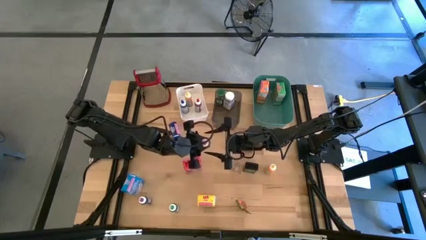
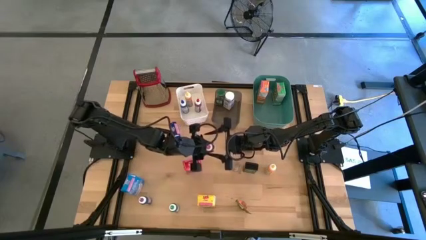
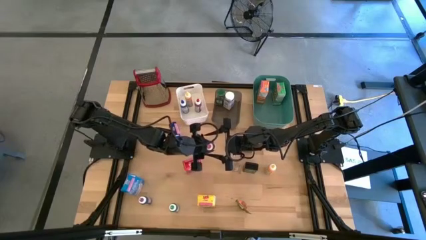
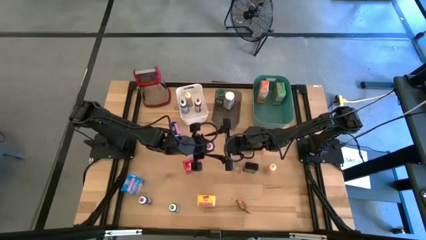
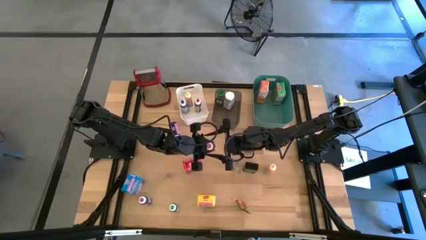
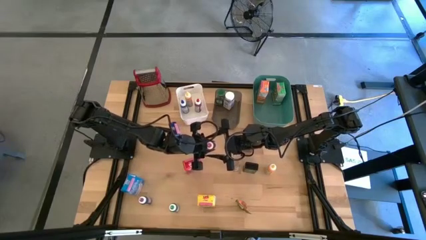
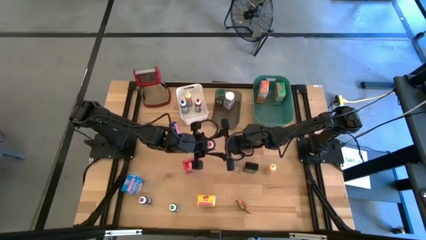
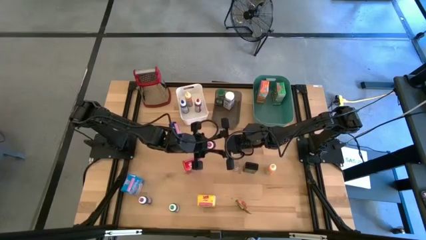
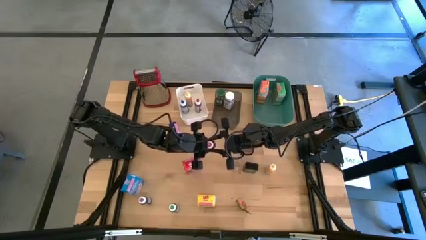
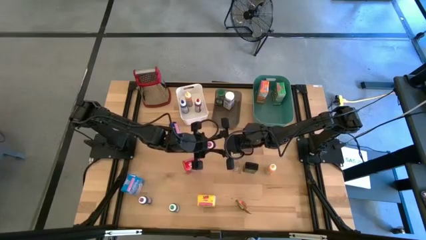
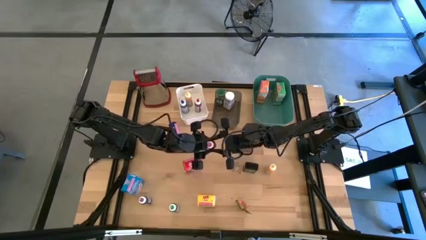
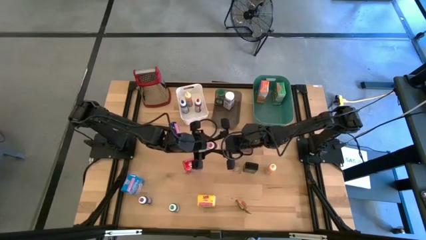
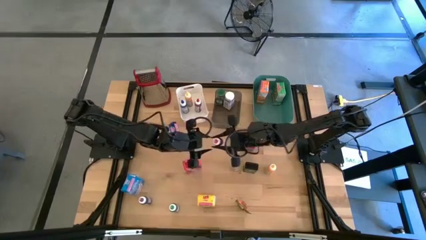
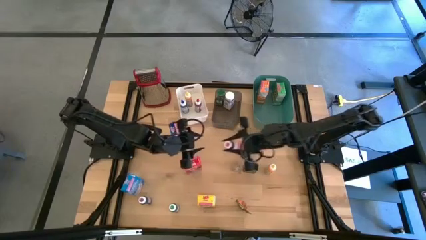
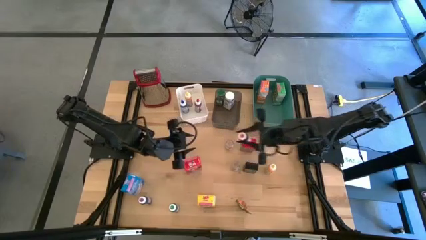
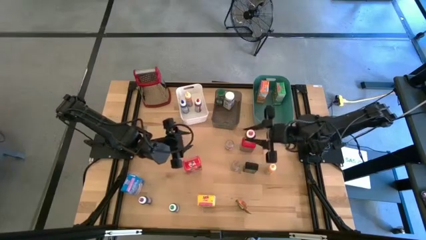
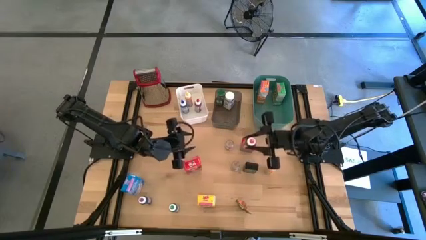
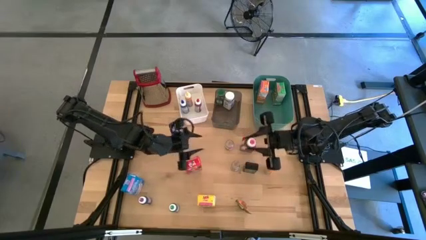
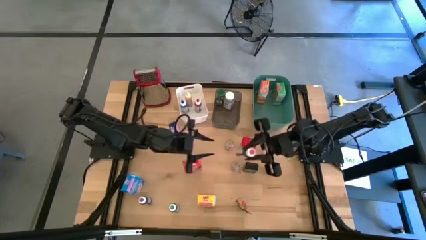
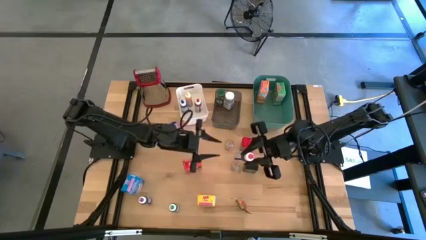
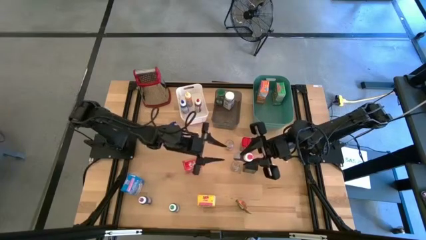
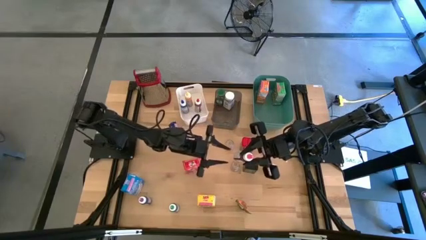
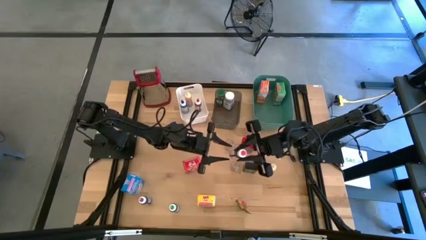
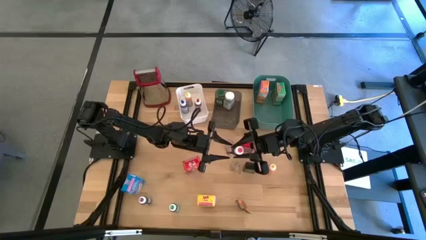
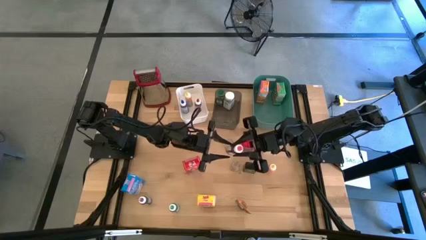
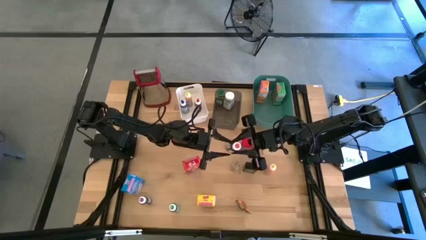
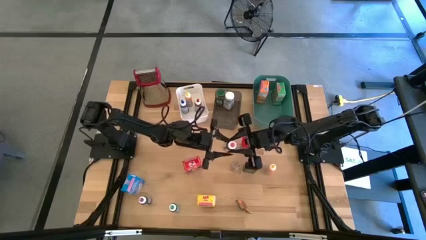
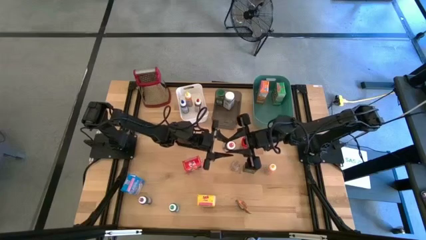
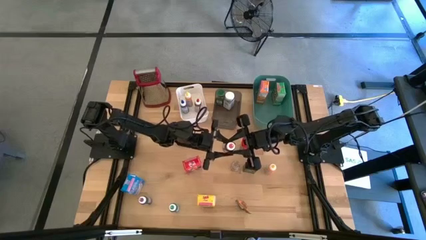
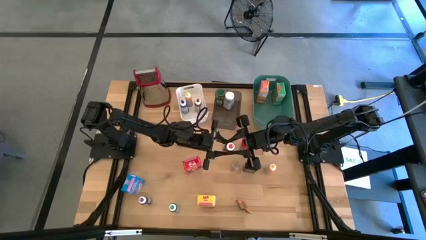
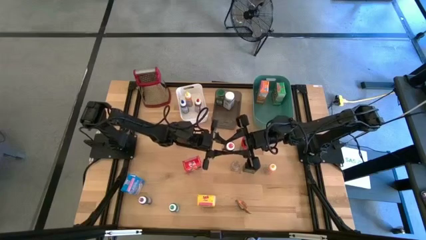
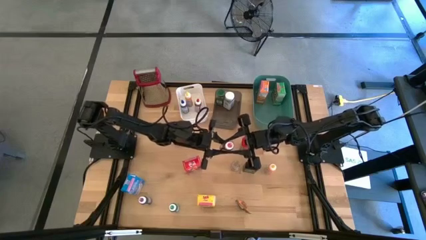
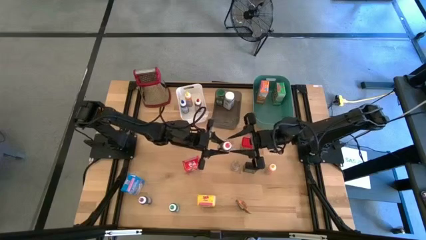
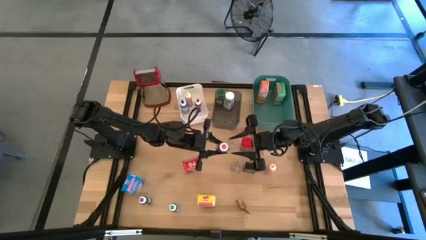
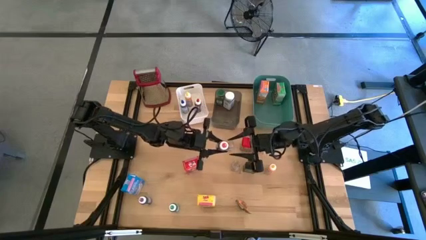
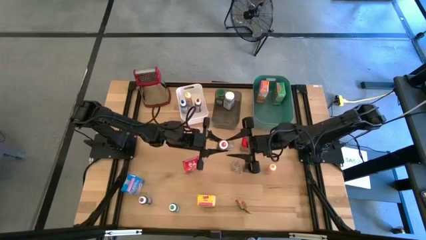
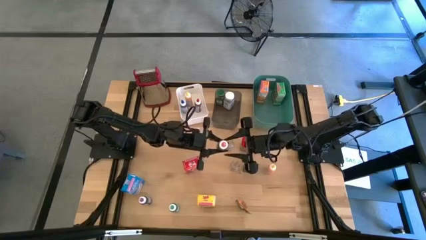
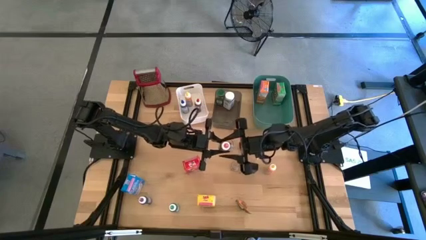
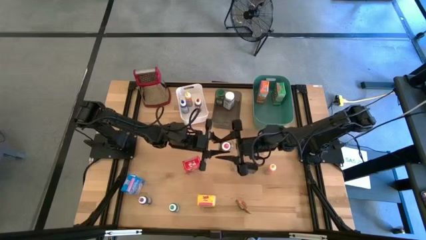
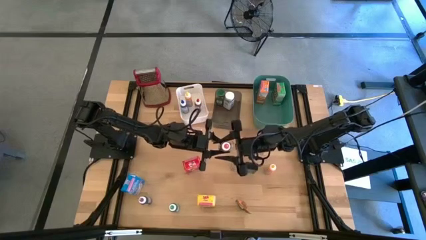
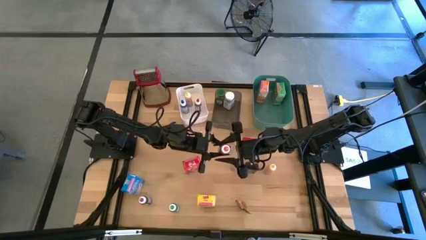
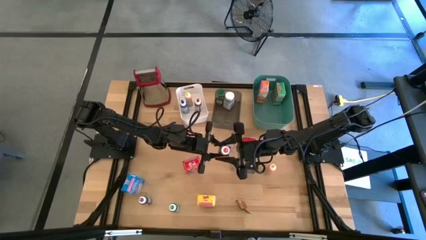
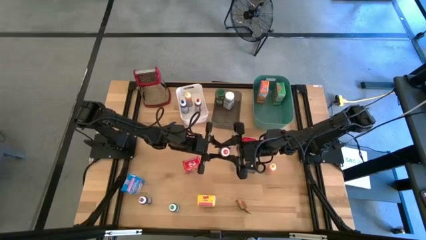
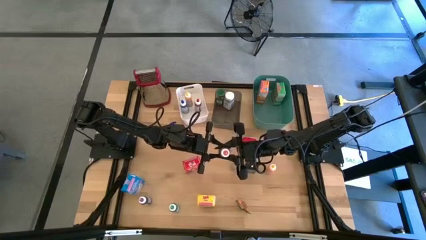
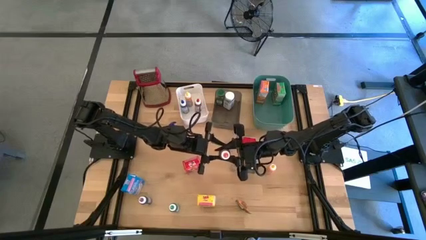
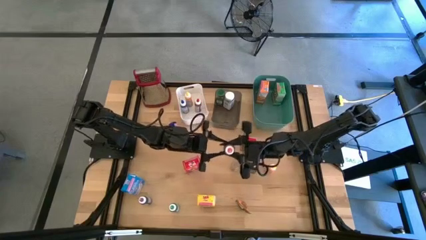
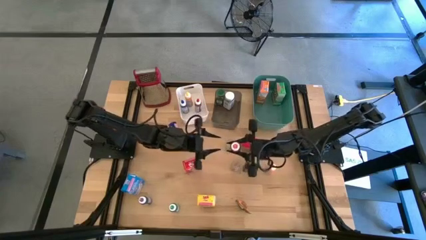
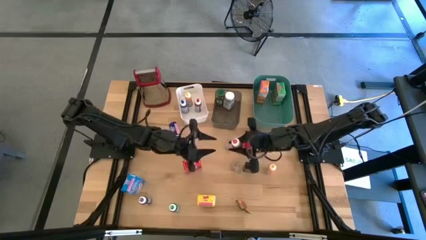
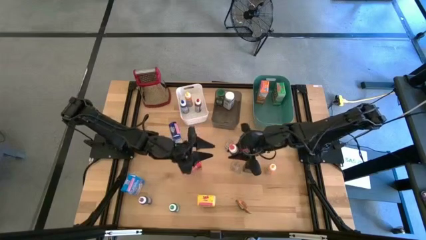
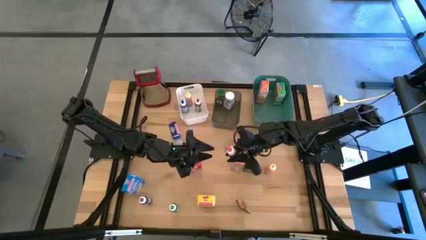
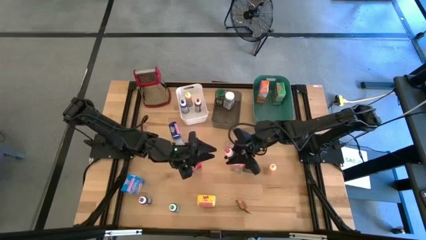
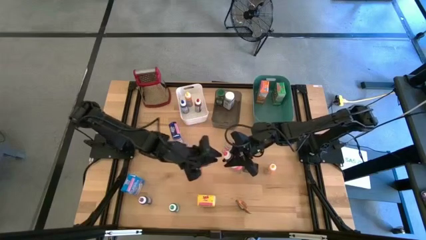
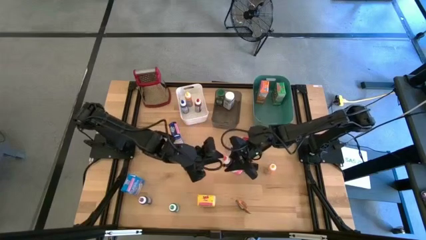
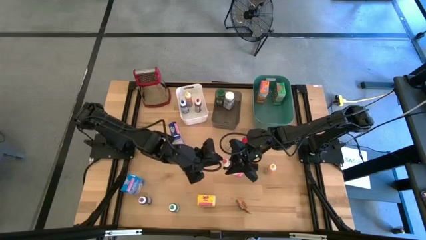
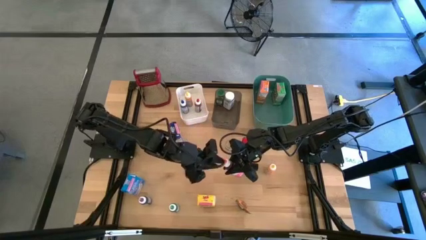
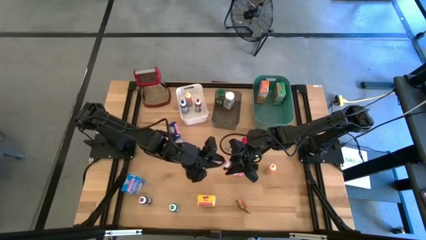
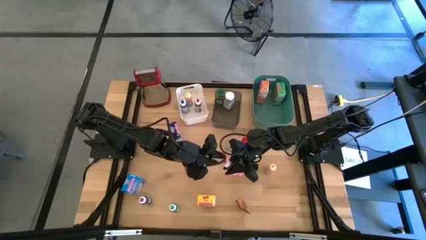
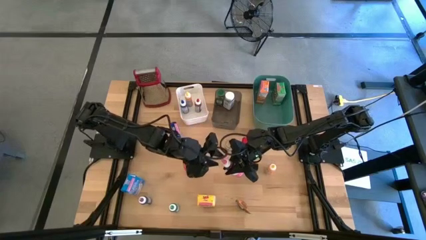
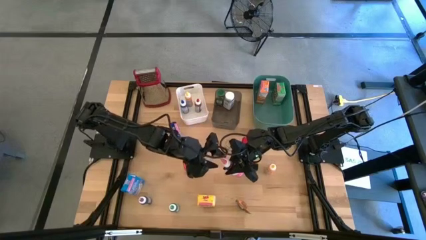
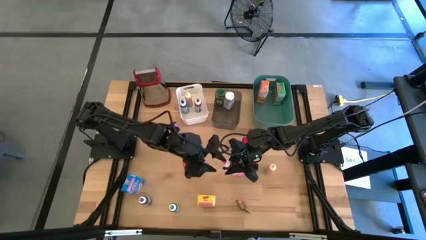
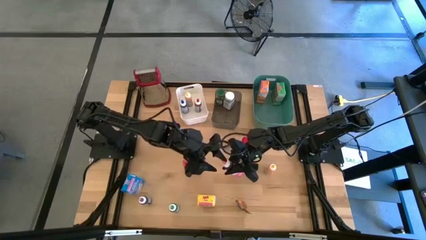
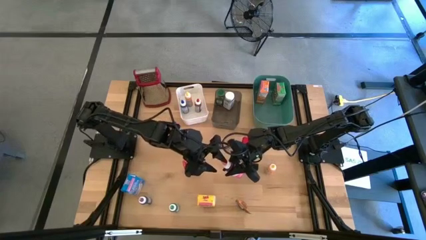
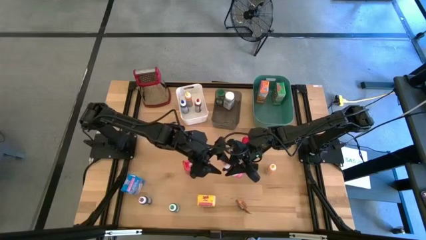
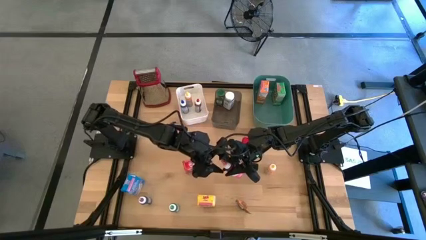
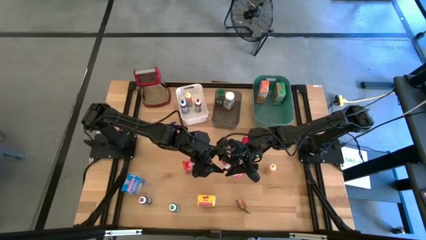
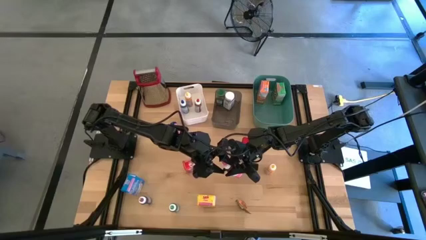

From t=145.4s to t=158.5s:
Task: Pick & Place Kitchen Items
Put the pink food coloring into the white bin

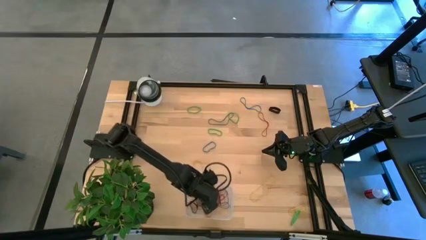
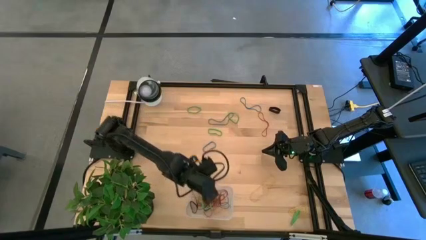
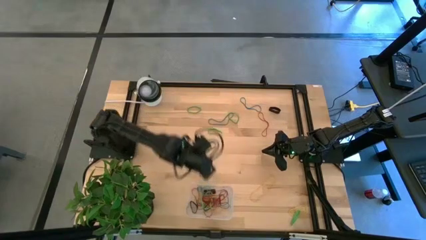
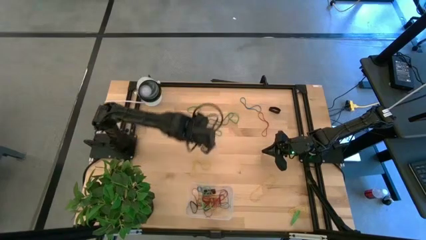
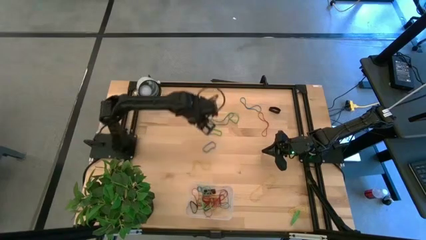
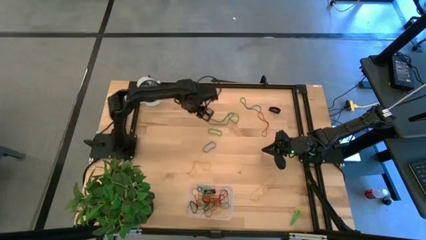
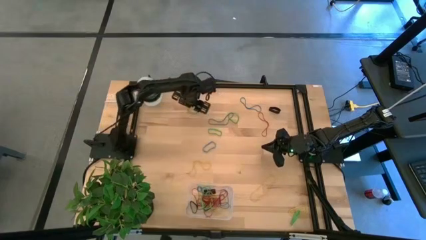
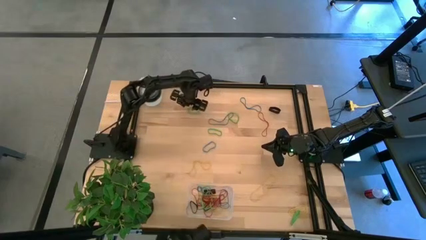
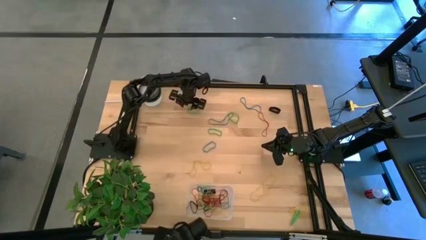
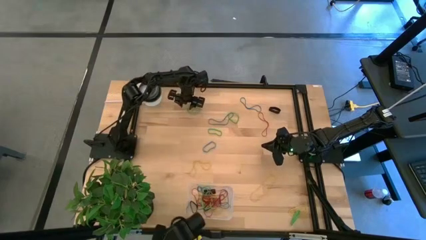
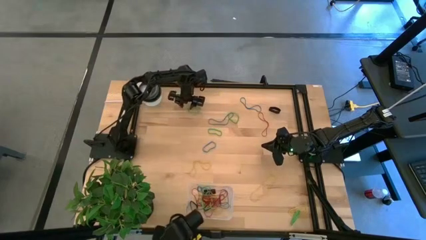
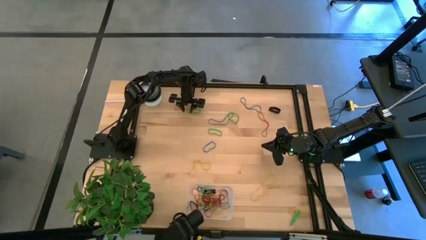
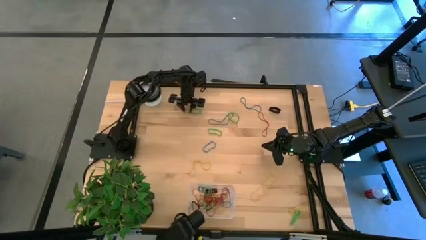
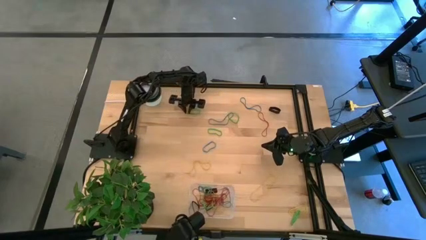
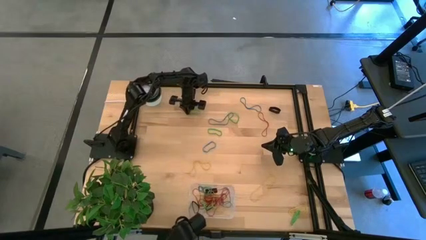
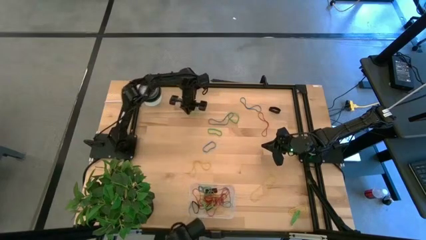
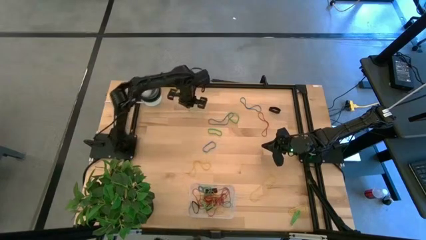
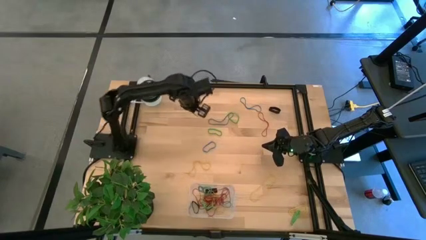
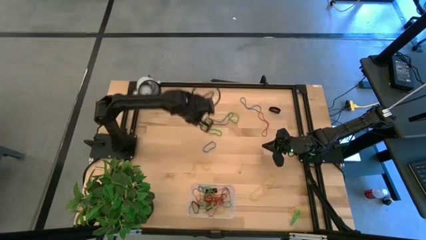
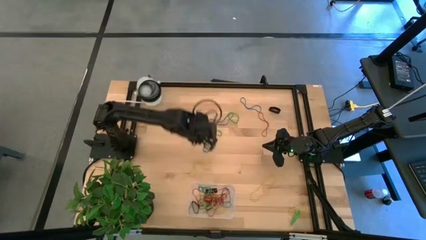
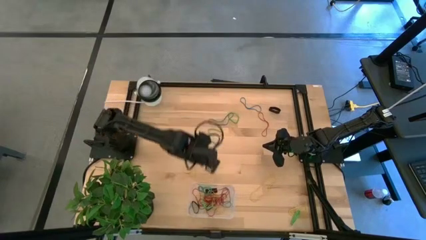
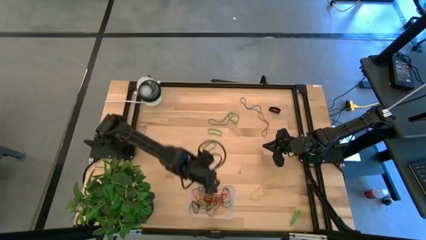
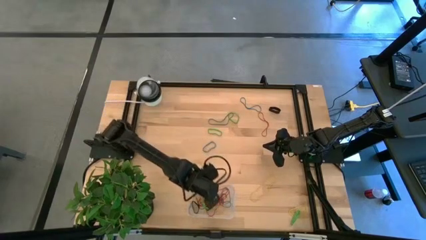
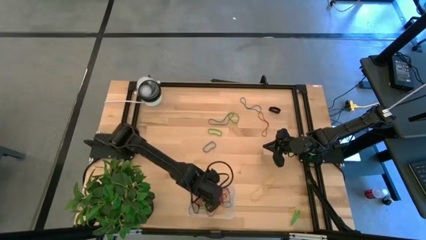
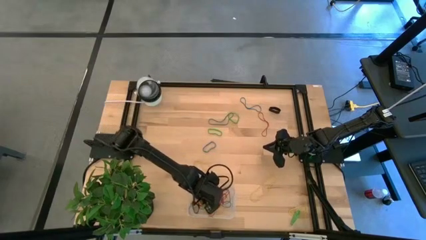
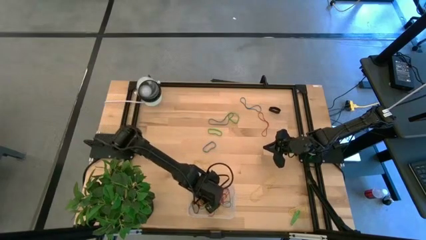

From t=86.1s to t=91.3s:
Task: Pick and place rubber bands into bin
Put the green rubber band into the transparent bin
